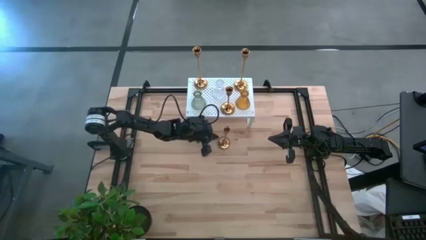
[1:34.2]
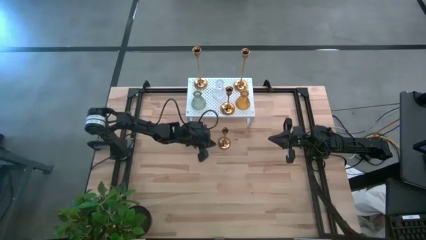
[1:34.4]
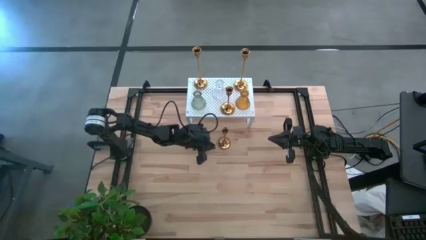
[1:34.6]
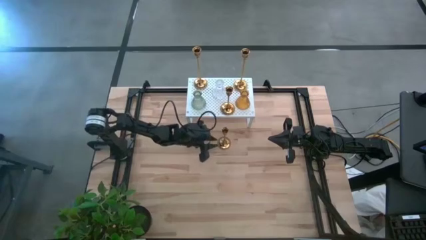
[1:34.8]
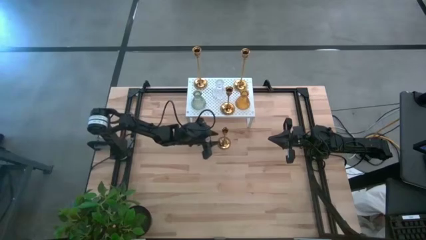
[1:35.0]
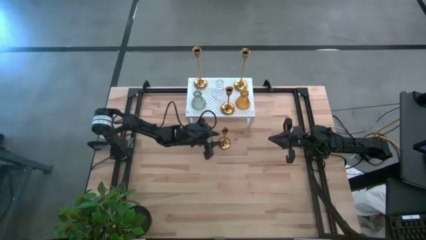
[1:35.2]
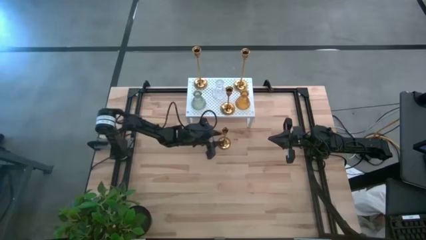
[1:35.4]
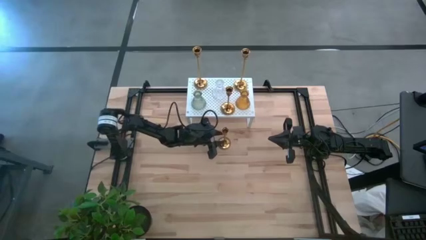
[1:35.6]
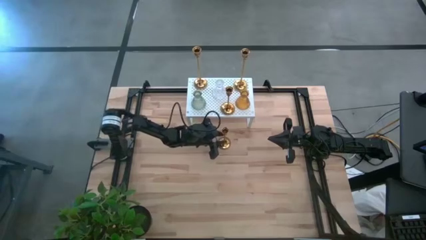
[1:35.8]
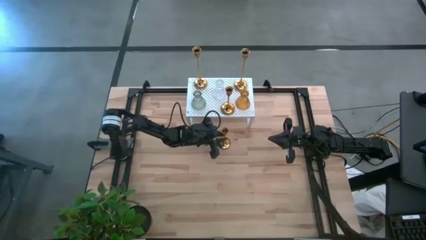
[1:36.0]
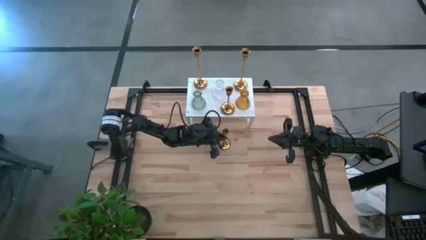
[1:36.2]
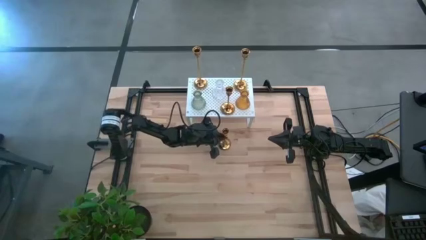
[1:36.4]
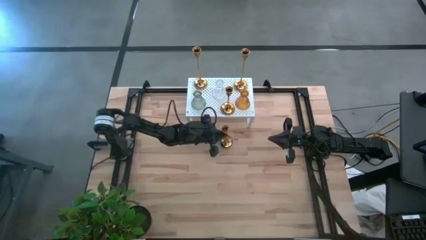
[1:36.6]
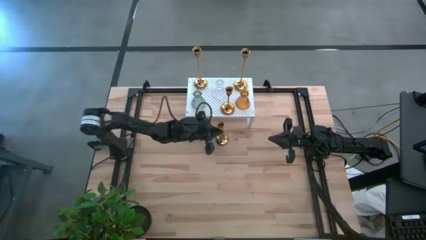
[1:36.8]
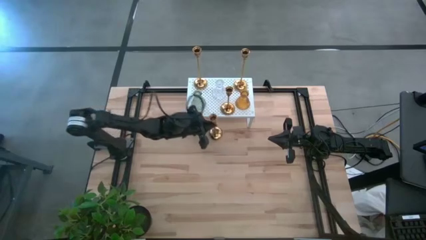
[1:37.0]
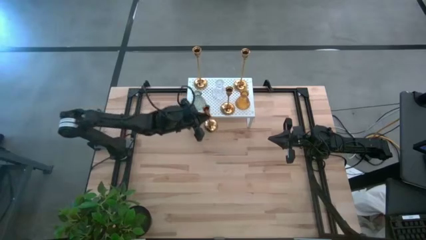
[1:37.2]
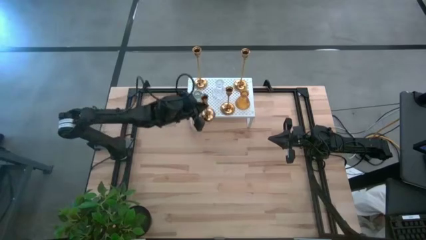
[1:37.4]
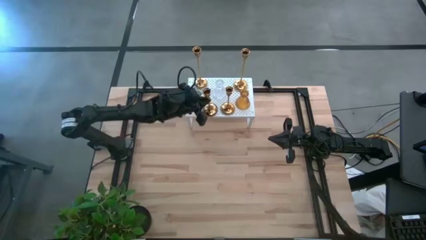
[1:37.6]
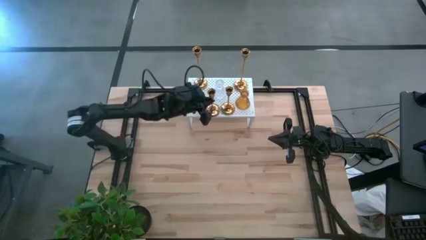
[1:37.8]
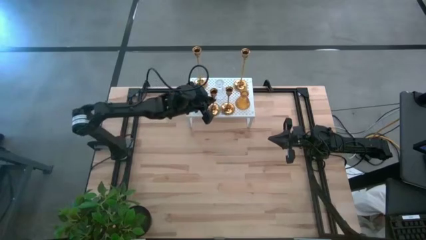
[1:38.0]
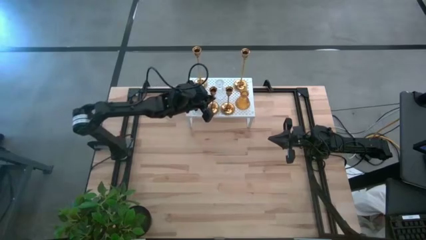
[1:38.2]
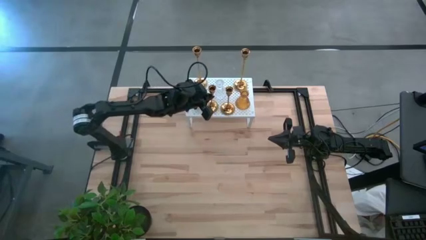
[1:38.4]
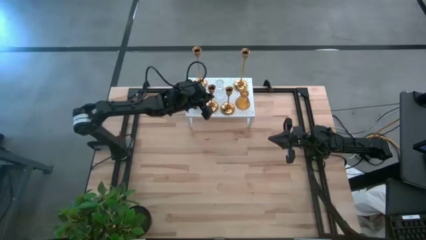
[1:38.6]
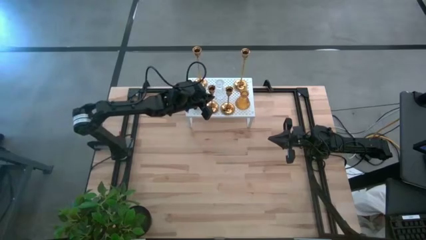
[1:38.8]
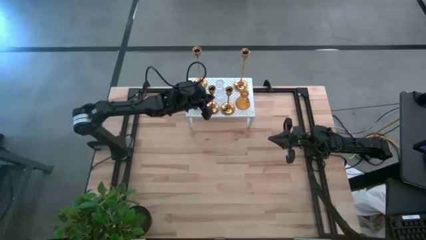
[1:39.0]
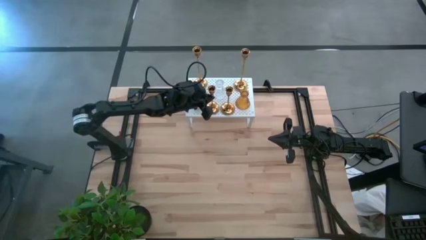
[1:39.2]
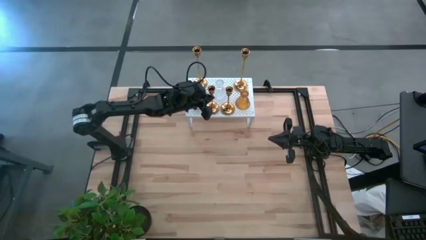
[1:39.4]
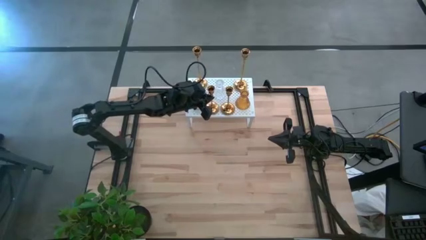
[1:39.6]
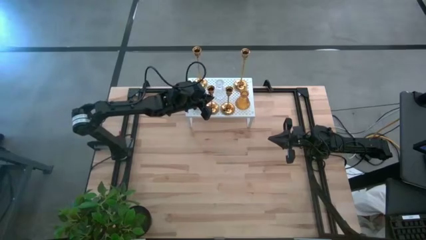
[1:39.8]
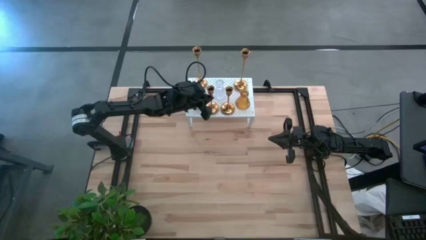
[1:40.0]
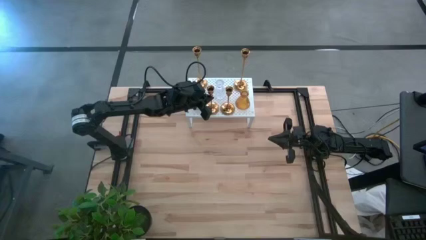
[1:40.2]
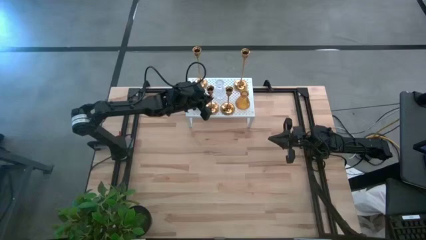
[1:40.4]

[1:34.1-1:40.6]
Task: Pick & Place candle stick holders
Put the gold candlestick on the shelf

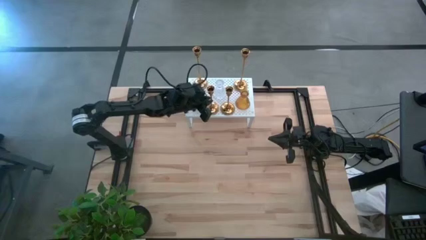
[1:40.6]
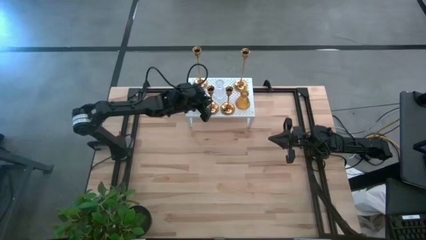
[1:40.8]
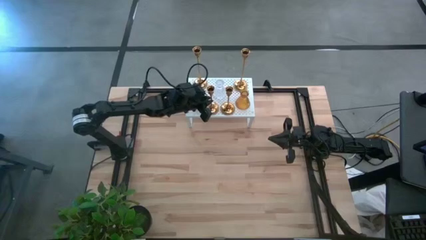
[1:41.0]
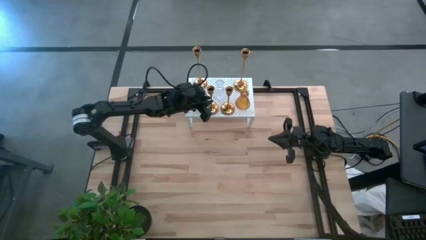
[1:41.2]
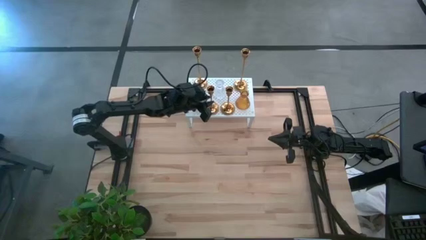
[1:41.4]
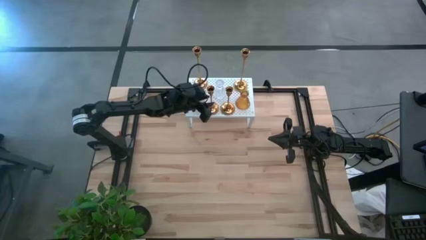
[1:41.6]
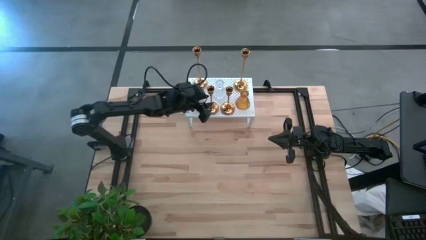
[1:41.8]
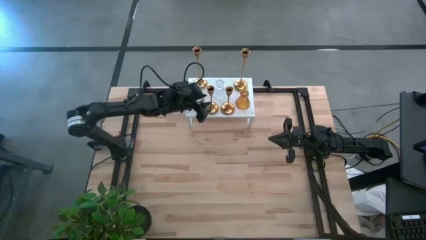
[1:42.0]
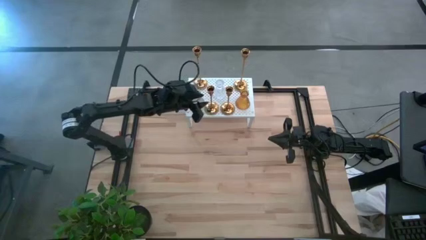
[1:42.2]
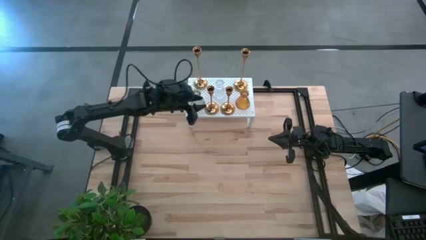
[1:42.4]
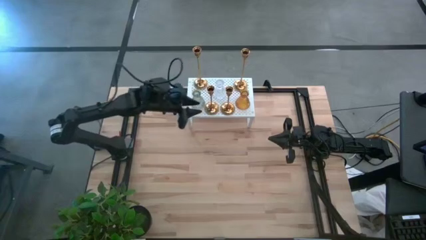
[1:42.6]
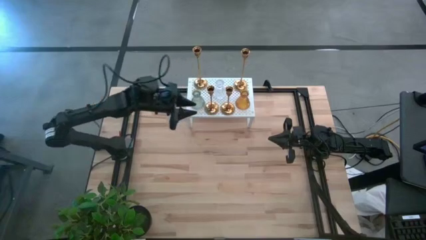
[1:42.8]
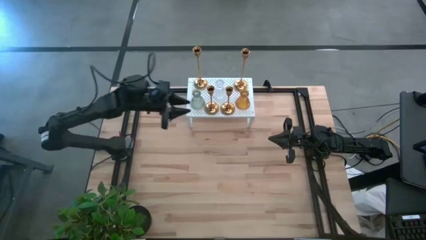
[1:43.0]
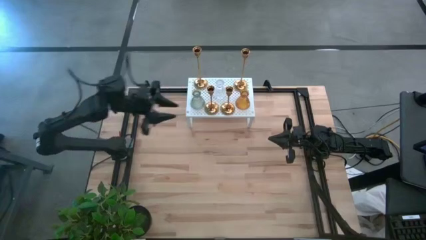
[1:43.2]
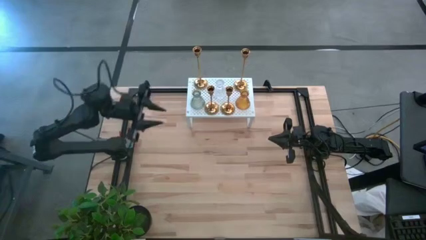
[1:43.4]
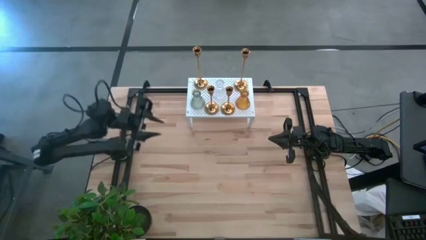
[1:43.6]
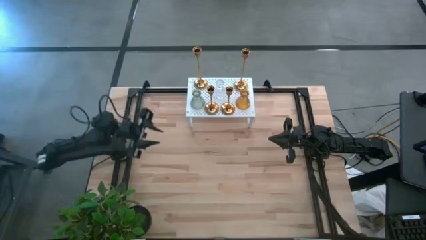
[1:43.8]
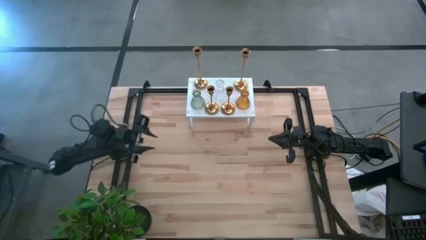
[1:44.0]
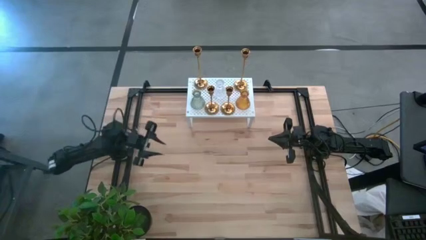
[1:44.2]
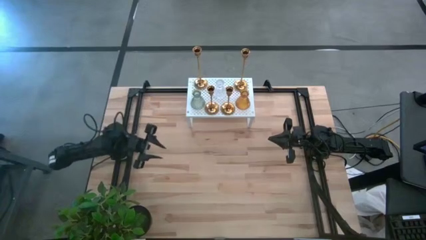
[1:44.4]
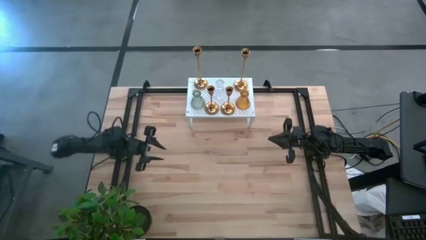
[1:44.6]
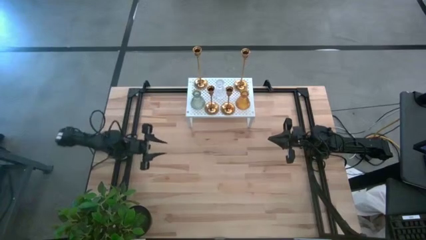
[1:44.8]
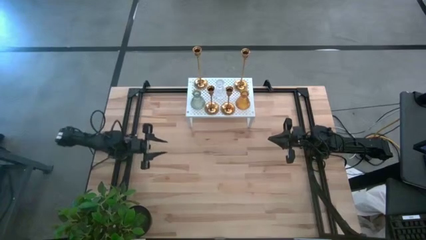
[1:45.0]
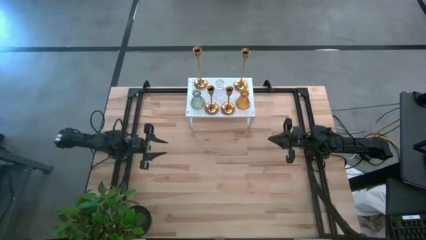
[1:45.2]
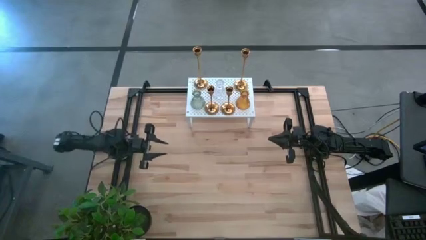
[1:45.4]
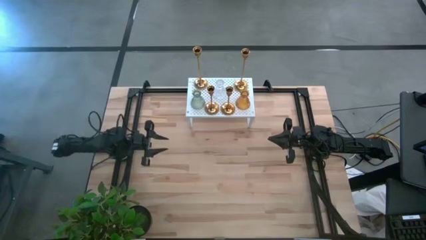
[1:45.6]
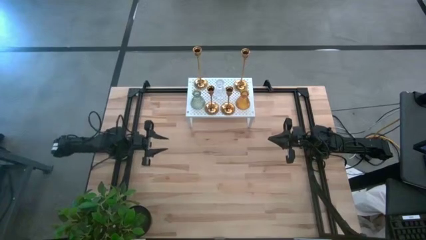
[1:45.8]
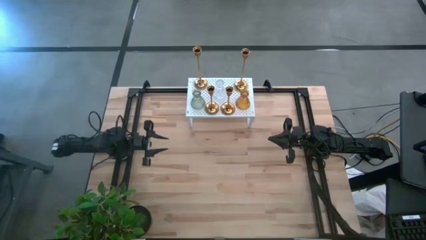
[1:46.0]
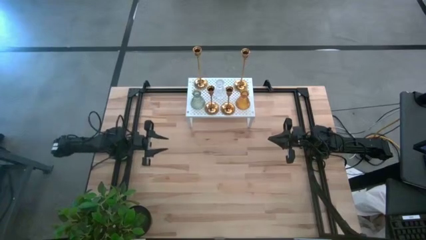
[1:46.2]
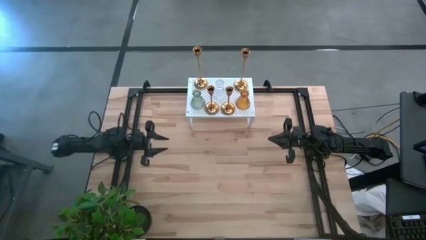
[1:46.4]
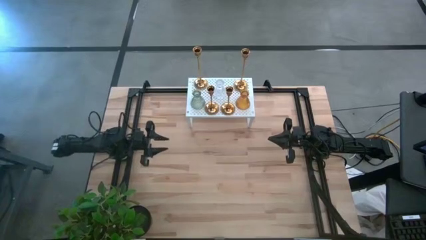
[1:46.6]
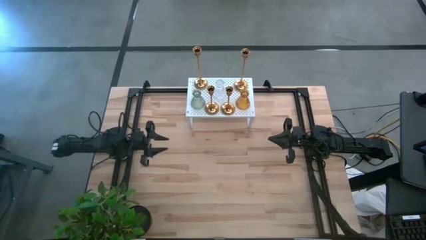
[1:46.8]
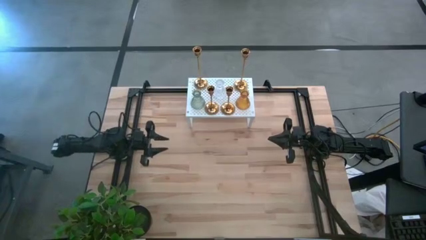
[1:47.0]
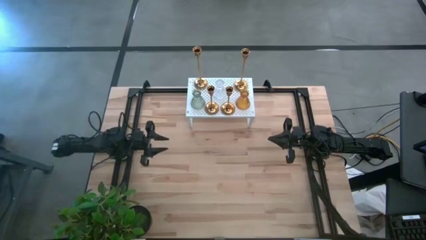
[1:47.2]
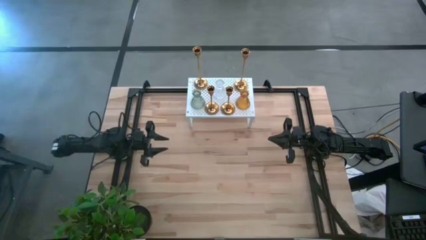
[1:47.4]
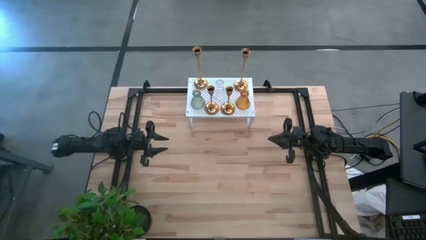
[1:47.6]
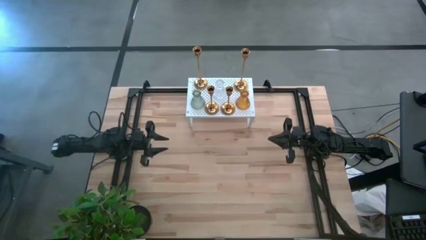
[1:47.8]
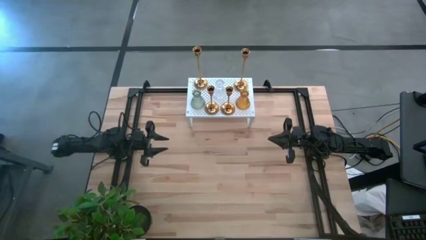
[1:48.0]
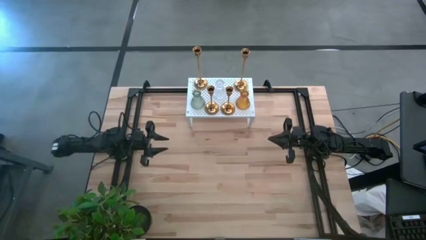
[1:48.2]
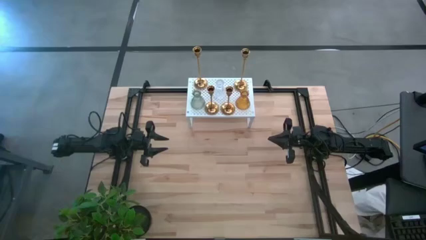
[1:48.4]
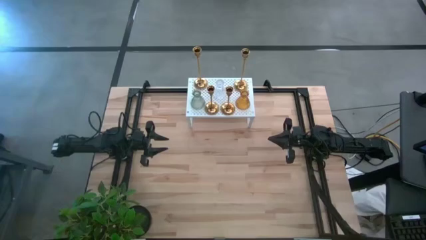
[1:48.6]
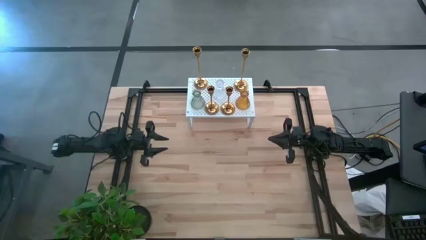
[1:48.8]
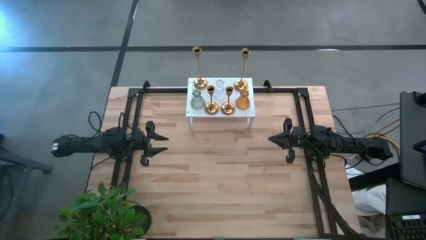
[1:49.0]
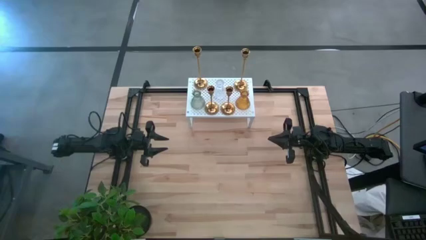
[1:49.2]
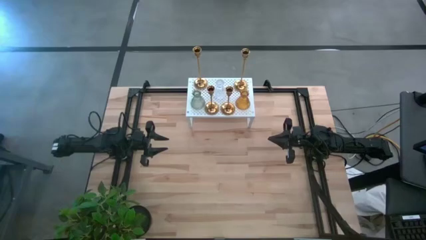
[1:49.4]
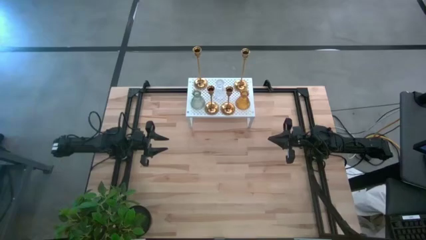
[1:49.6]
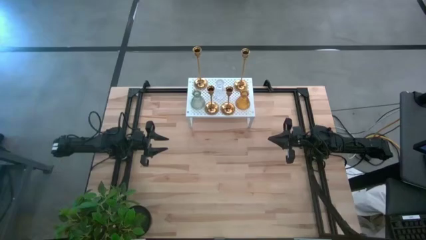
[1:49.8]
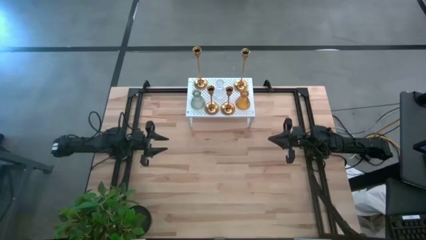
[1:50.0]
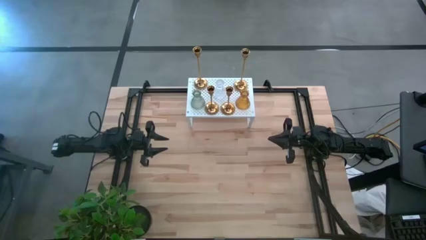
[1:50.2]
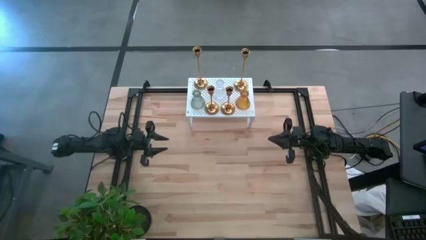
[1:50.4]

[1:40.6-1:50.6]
Return to Home Position
